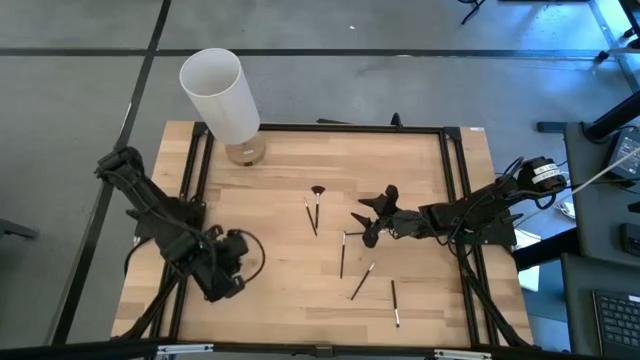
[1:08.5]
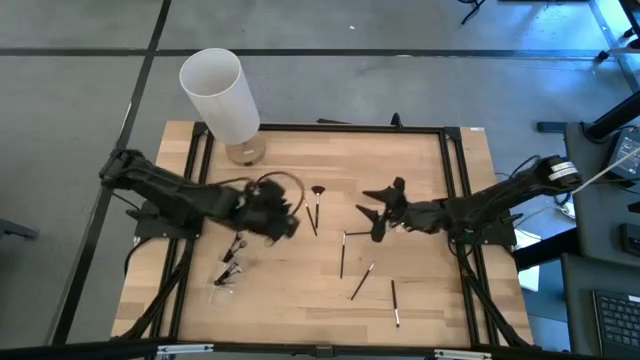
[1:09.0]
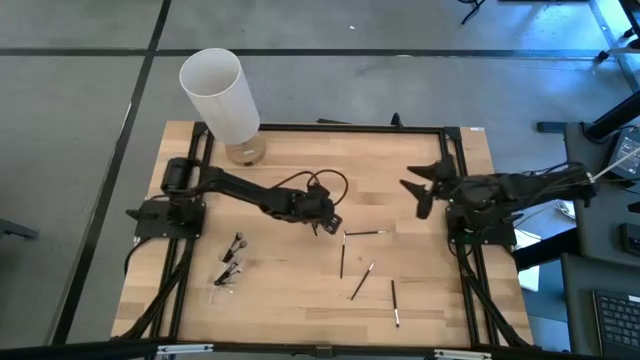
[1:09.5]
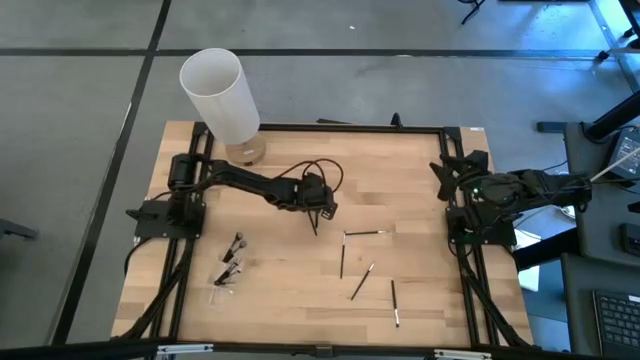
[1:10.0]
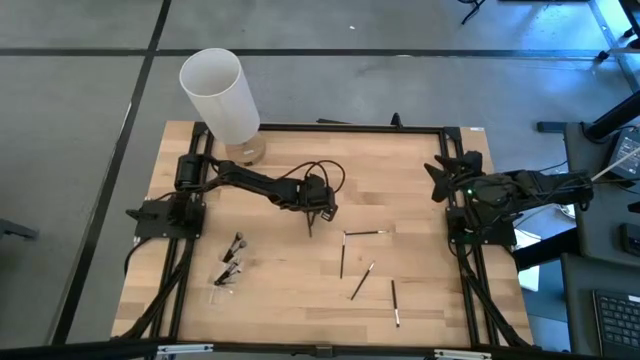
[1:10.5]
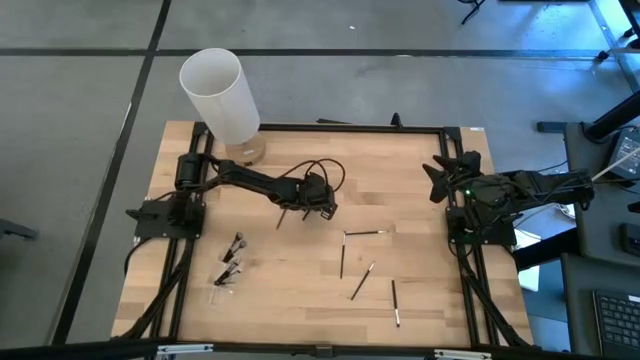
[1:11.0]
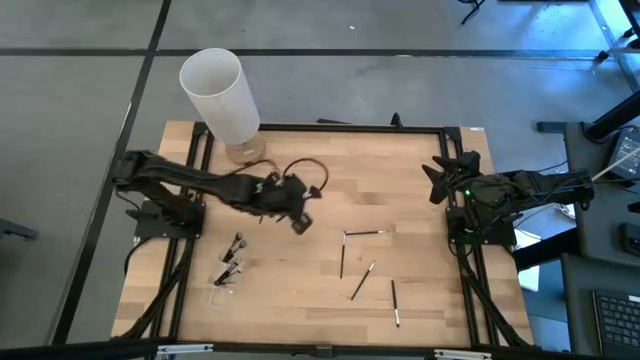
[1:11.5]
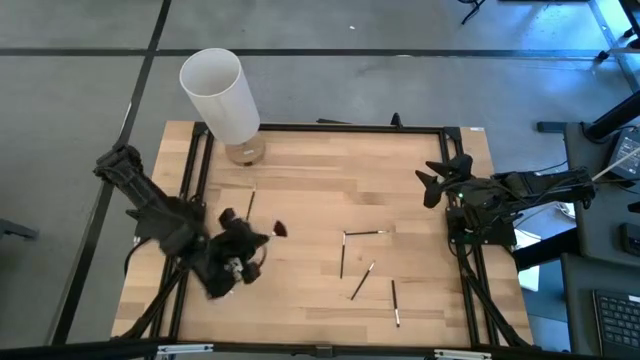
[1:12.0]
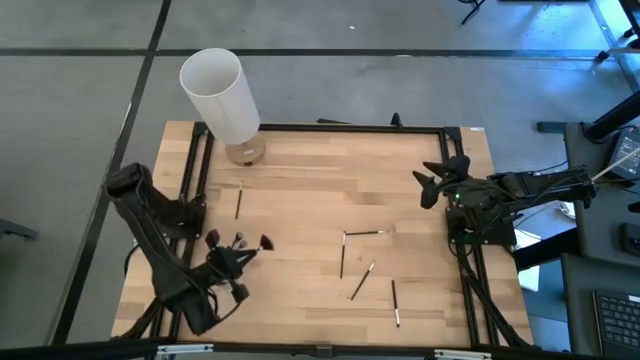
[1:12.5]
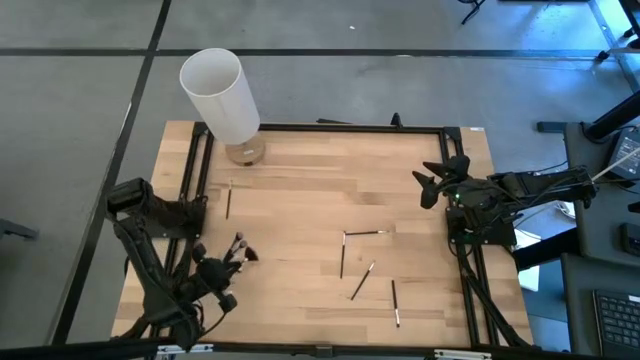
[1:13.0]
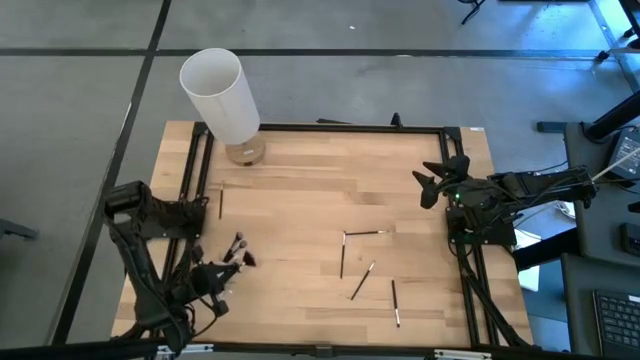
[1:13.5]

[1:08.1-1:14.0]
Task: Put items in baskets/containers
Put the black highlighter brush into the transparent organizer

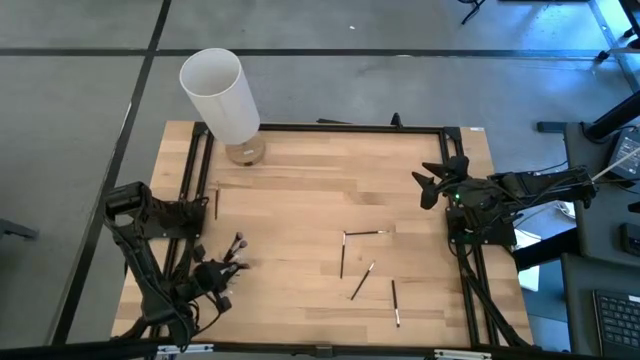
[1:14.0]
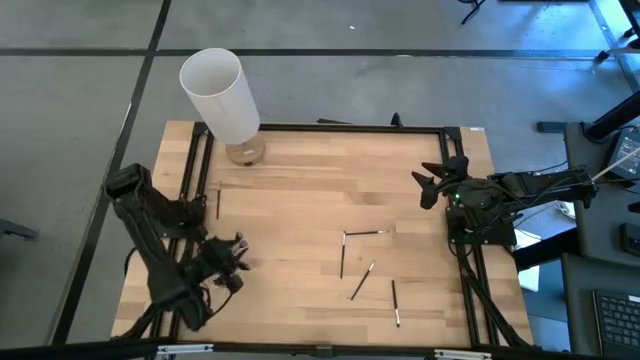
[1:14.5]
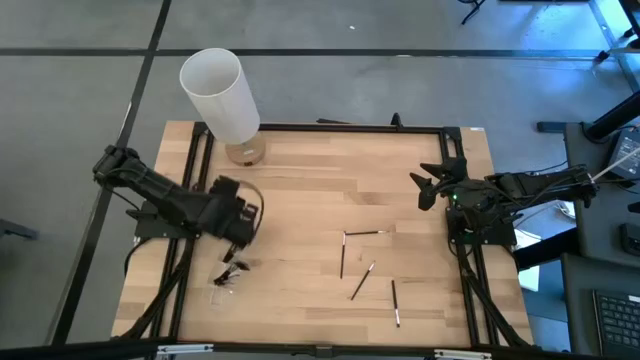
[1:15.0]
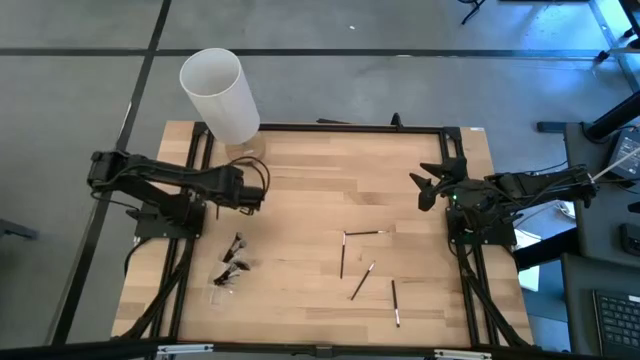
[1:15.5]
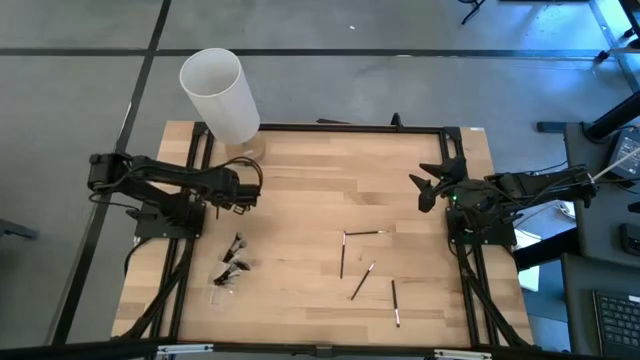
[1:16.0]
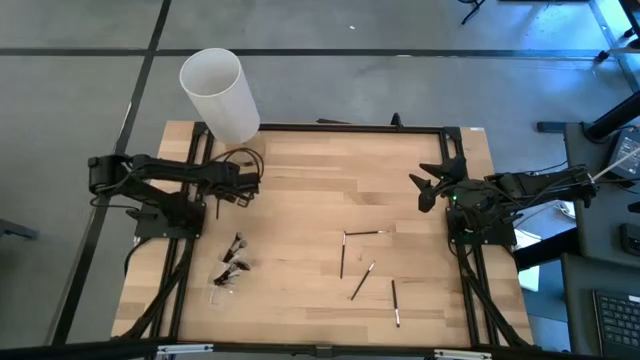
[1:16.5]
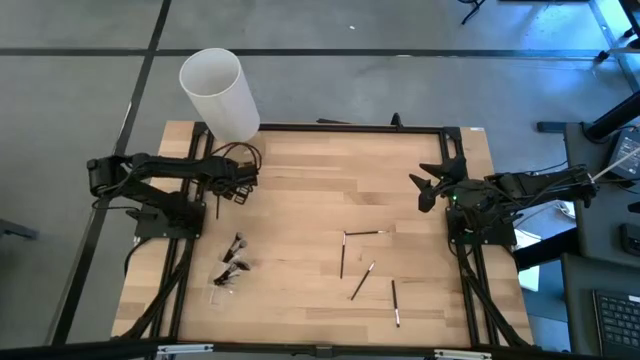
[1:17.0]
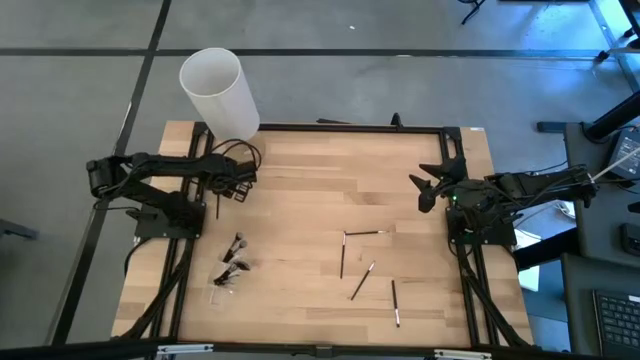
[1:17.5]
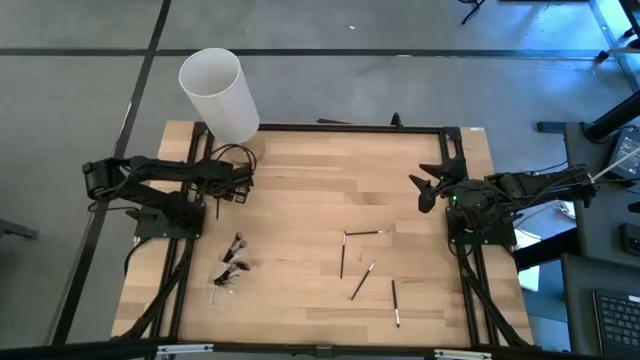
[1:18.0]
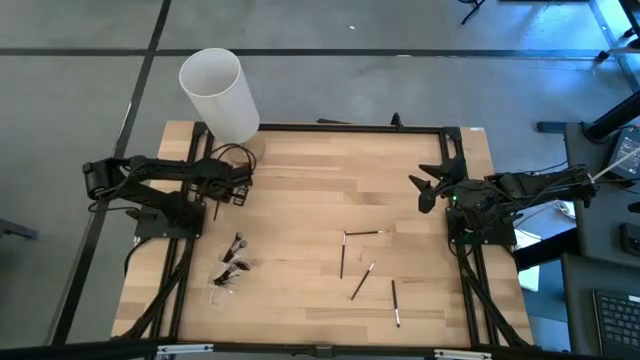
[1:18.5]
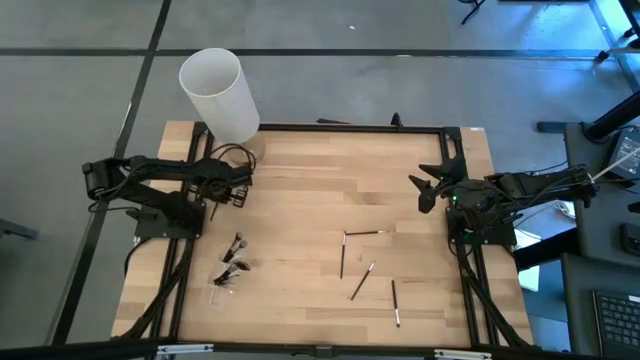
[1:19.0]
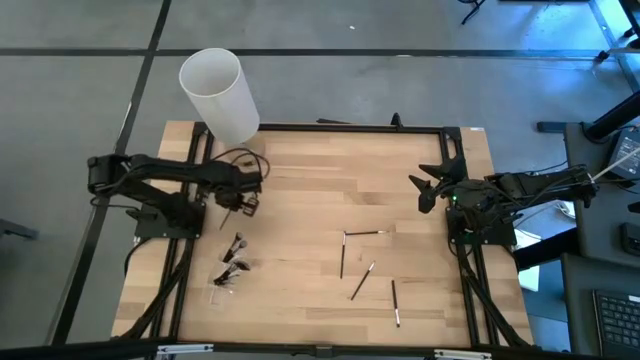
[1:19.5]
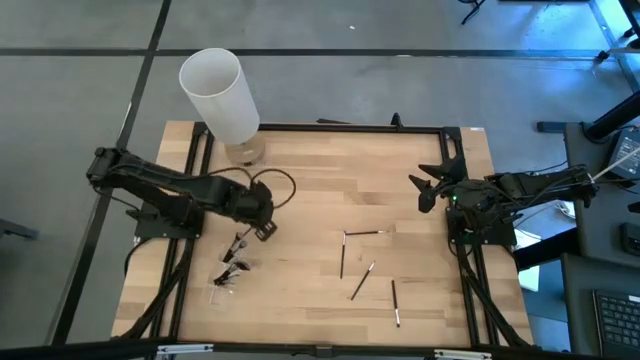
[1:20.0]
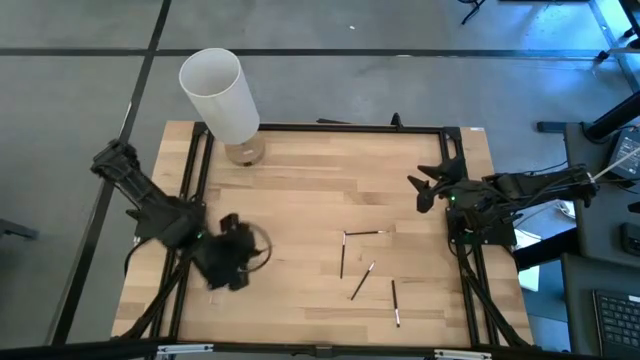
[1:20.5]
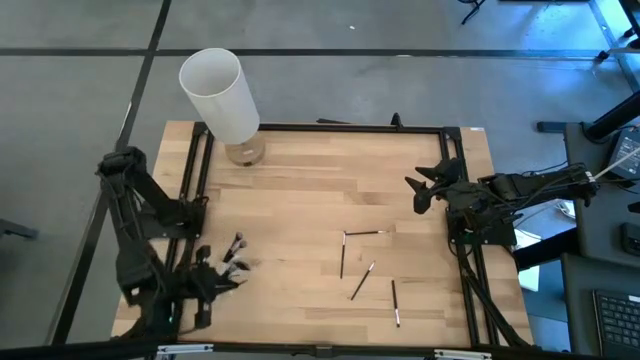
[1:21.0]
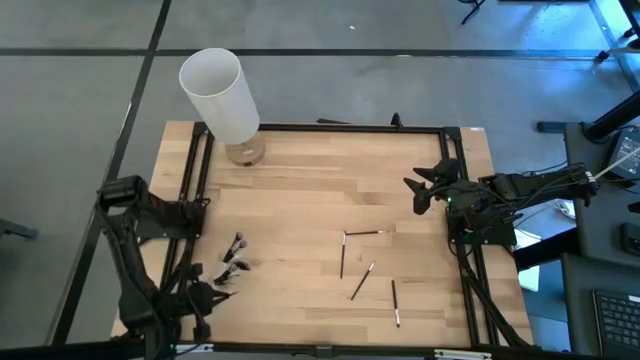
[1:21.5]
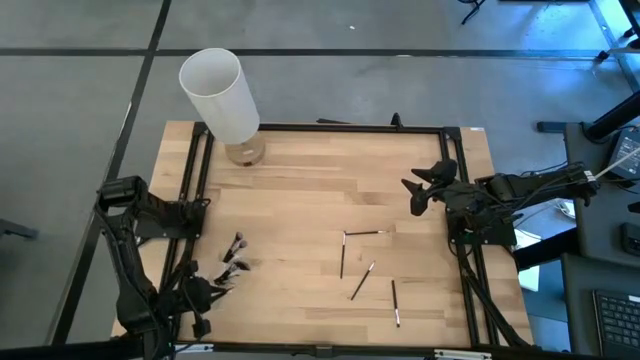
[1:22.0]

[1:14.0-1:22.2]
Put the black eyeshadow brush into the transparent organizer

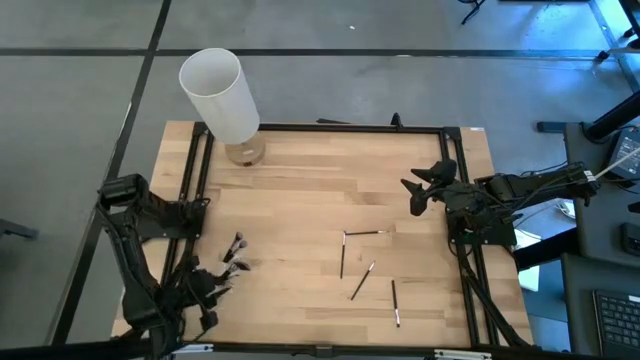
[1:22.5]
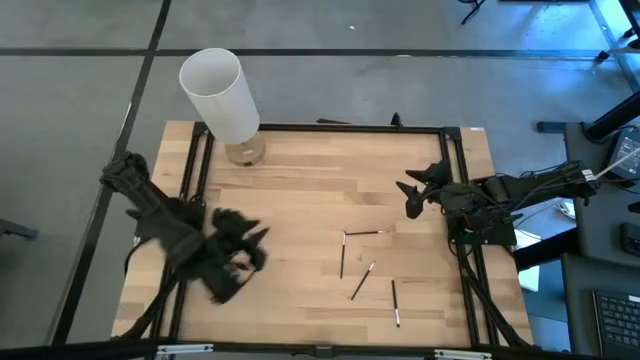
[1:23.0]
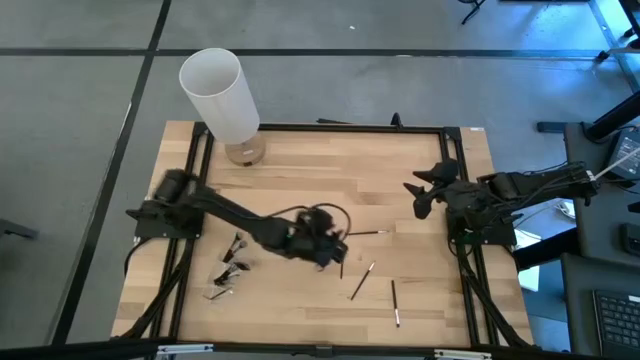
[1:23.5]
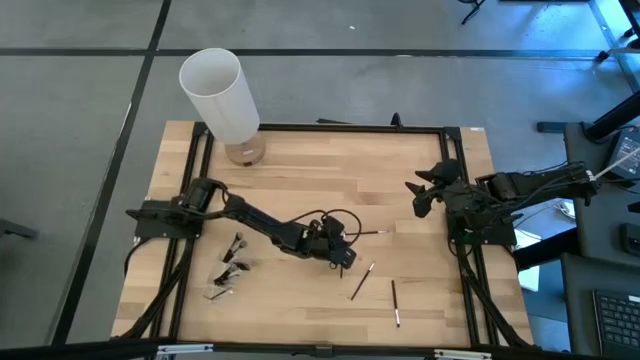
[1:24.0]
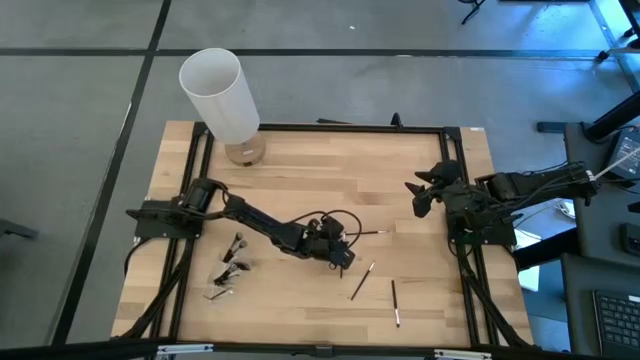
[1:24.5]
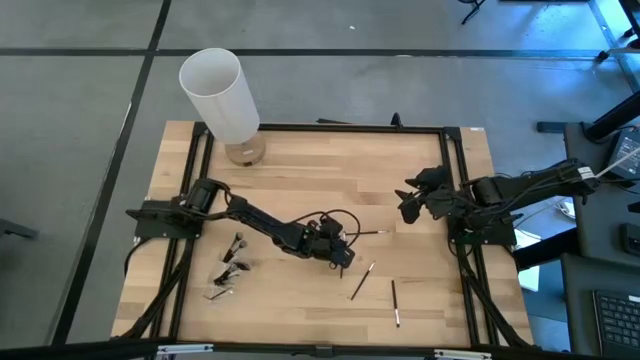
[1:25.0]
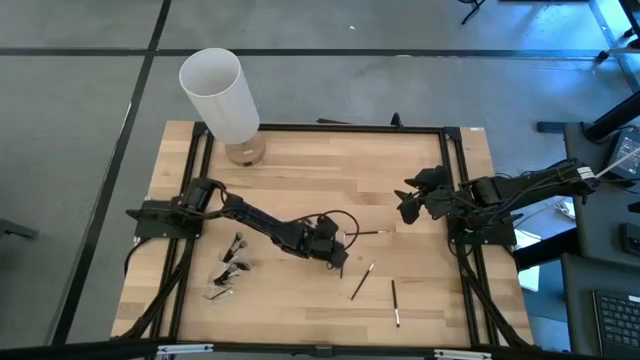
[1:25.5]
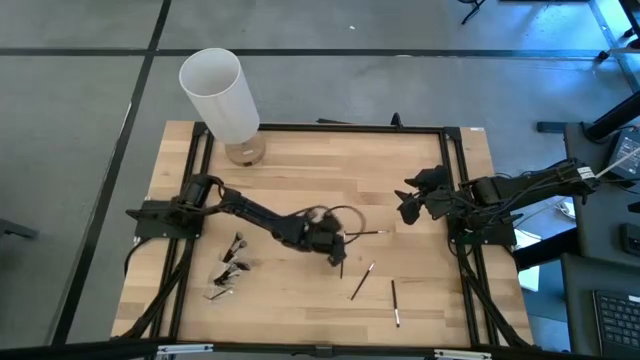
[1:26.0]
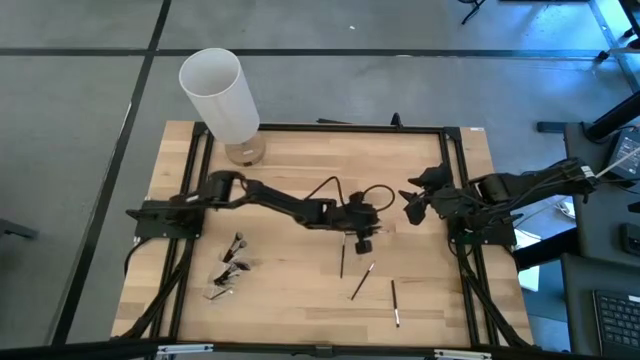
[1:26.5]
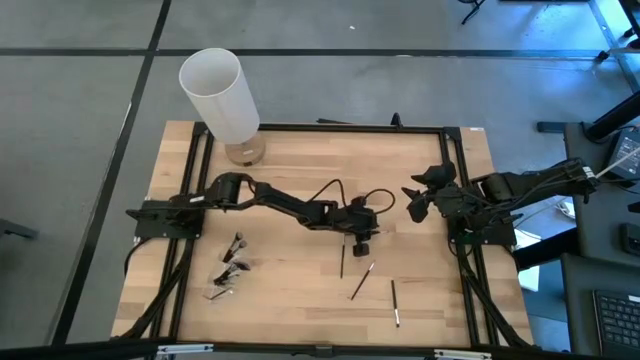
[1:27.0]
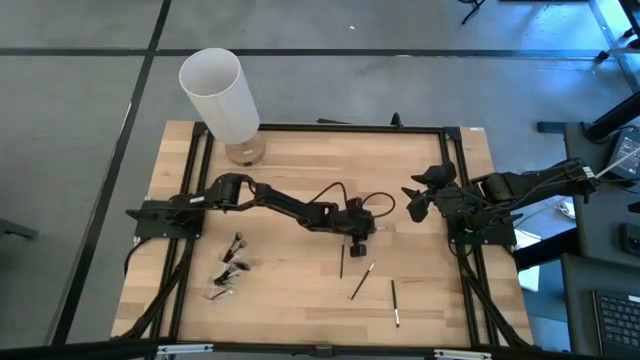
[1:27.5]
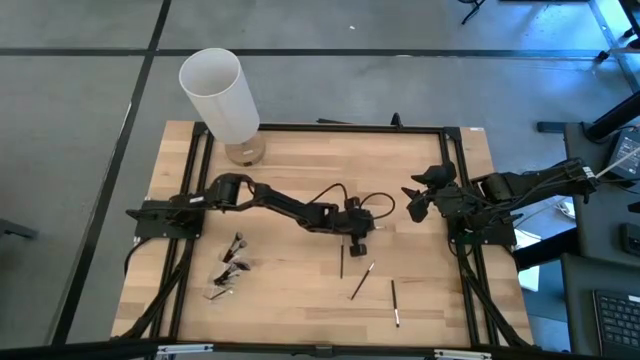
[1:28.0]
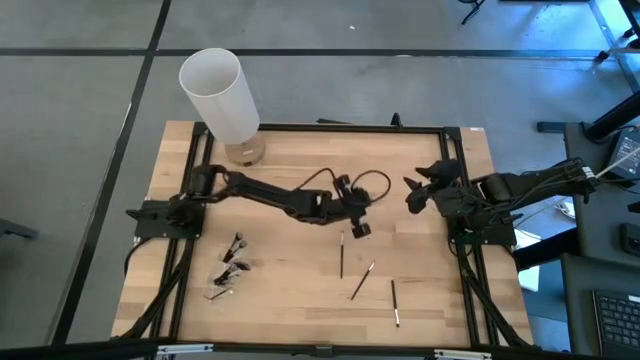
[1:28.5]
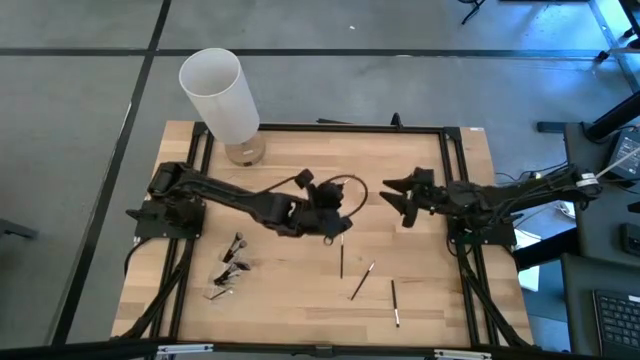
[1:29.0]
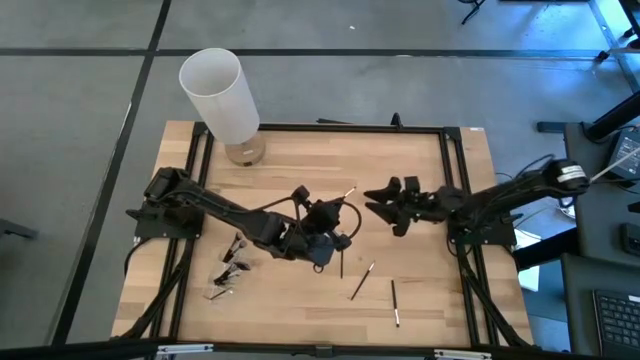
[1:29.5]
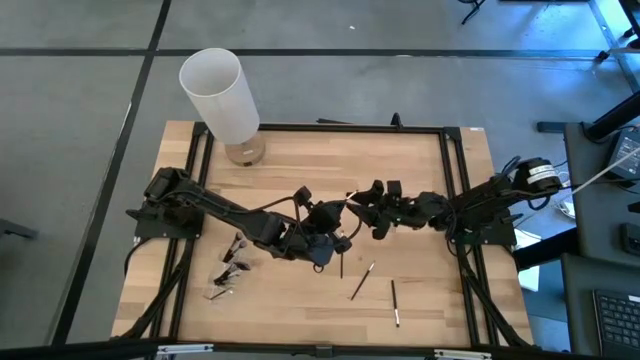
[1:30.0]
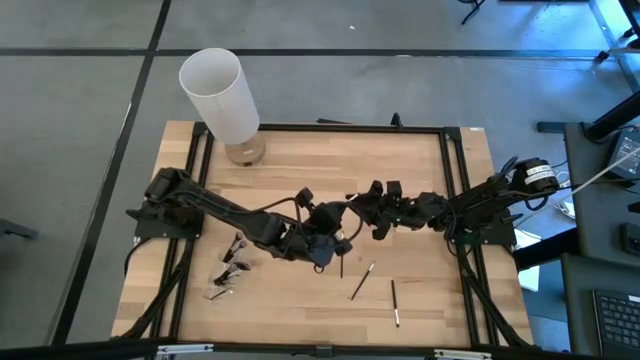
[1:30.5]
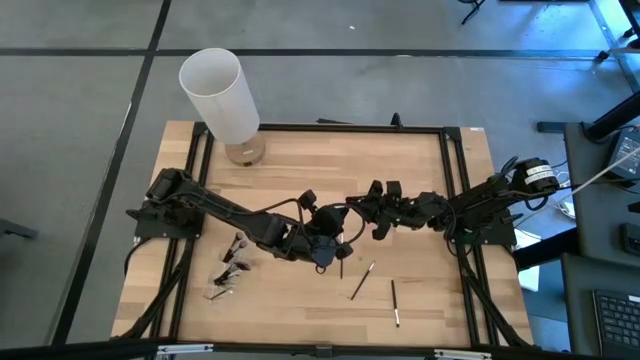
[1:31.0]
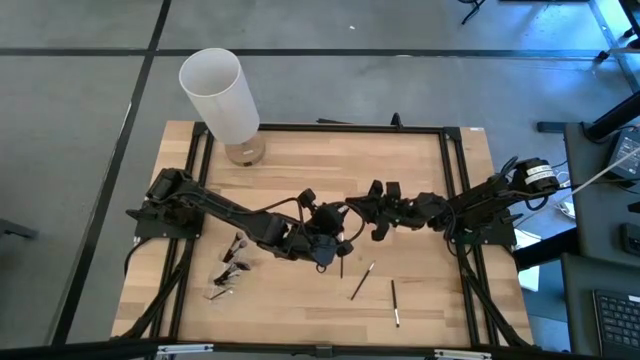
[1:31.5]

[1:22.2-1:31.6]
Put the black eyeshadow brush into the transparent organizer
